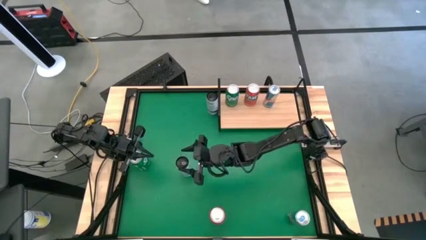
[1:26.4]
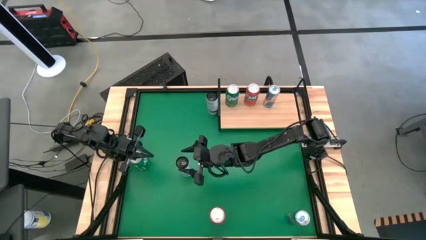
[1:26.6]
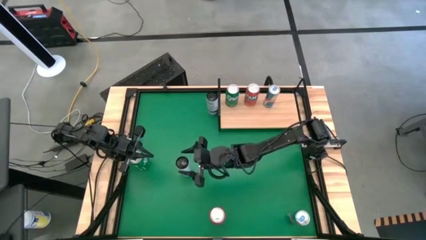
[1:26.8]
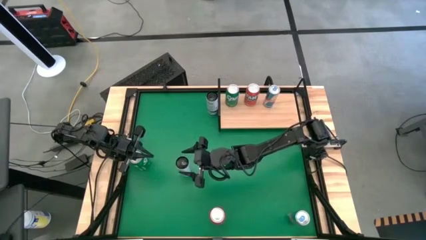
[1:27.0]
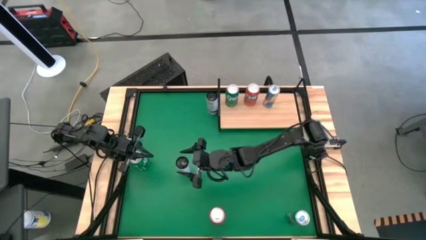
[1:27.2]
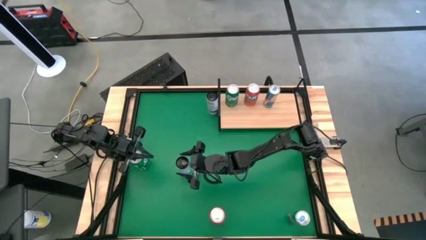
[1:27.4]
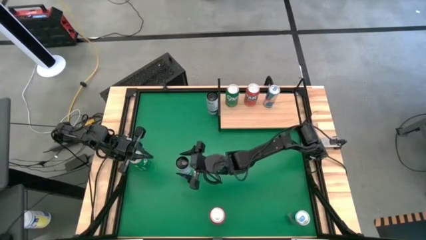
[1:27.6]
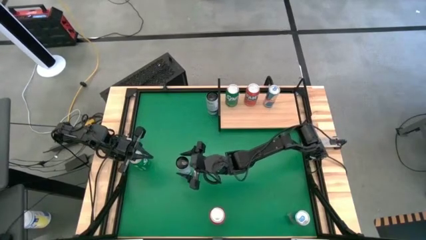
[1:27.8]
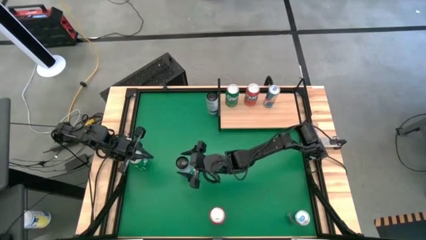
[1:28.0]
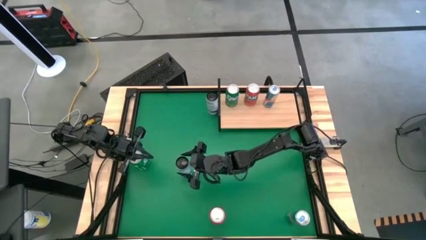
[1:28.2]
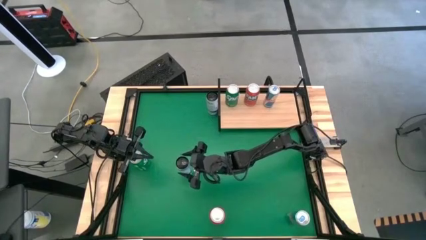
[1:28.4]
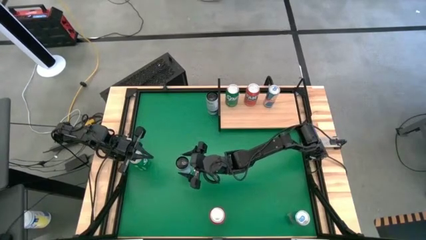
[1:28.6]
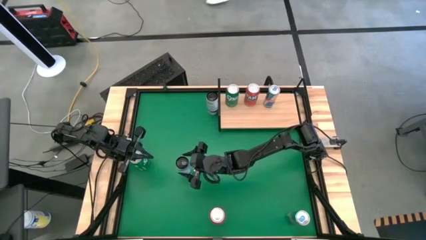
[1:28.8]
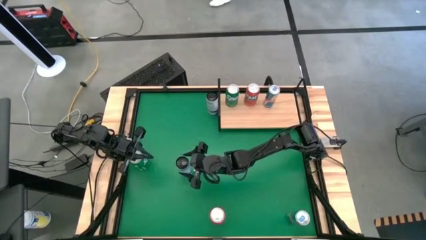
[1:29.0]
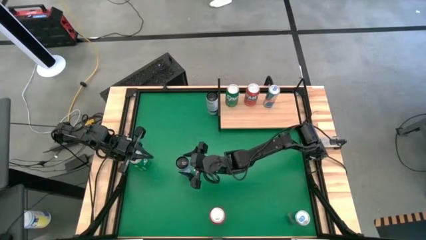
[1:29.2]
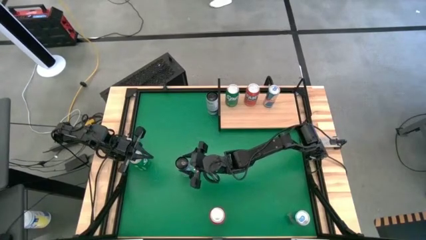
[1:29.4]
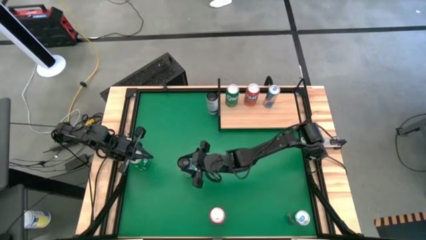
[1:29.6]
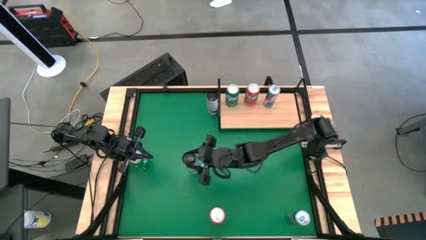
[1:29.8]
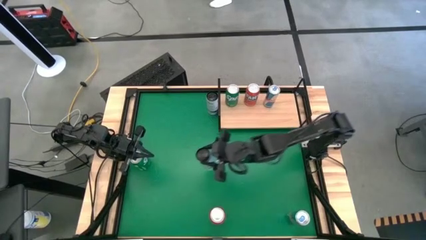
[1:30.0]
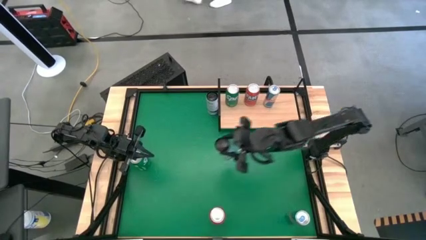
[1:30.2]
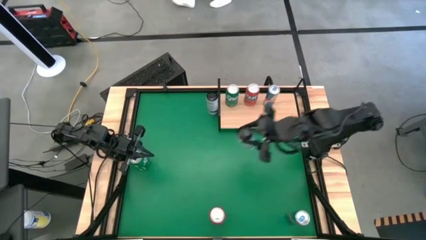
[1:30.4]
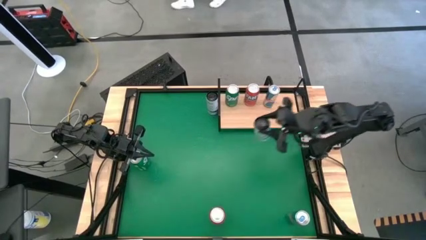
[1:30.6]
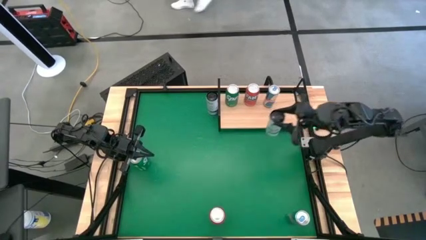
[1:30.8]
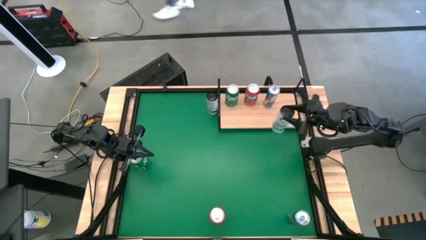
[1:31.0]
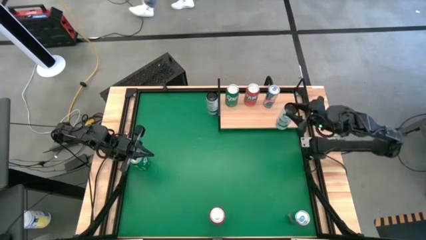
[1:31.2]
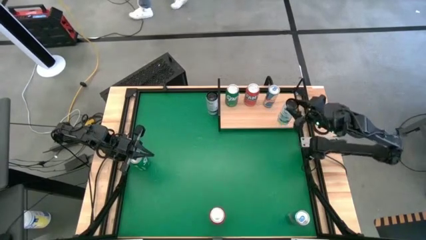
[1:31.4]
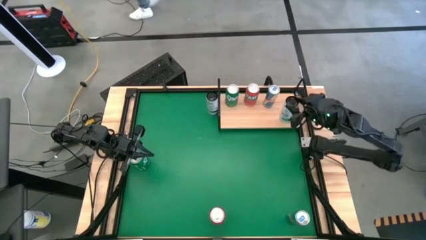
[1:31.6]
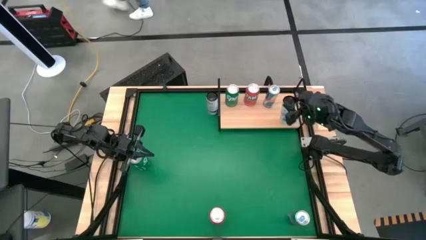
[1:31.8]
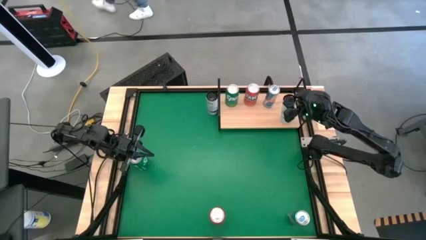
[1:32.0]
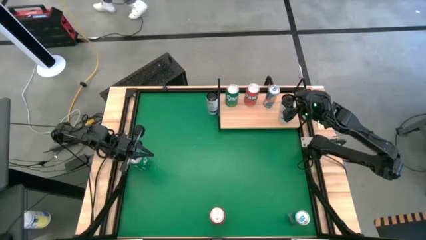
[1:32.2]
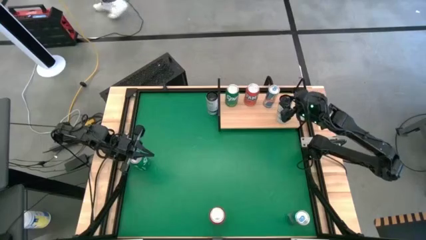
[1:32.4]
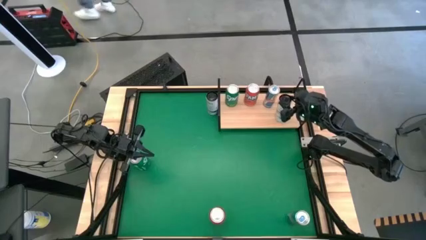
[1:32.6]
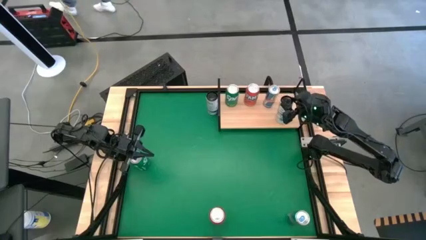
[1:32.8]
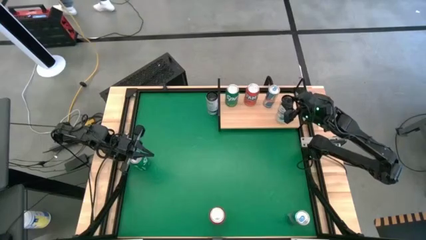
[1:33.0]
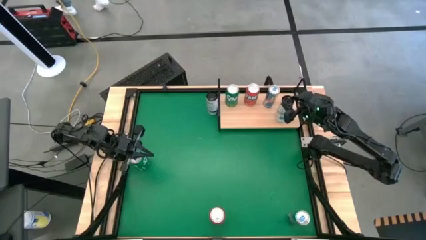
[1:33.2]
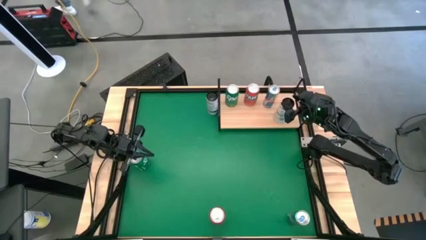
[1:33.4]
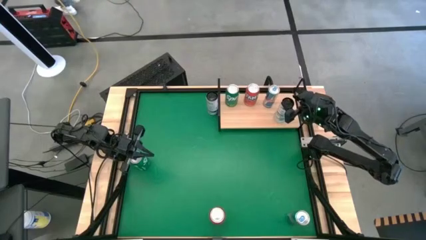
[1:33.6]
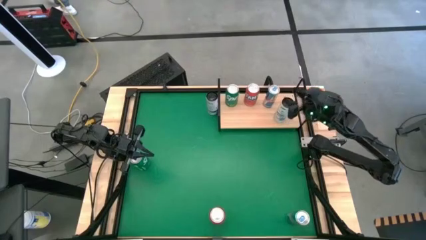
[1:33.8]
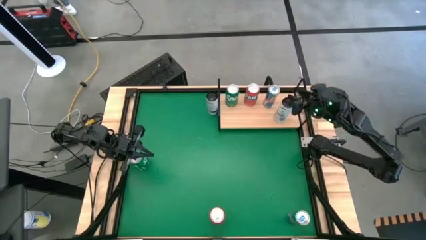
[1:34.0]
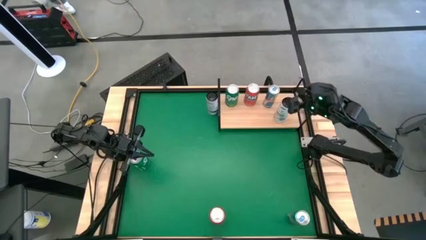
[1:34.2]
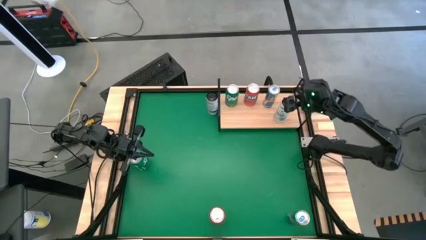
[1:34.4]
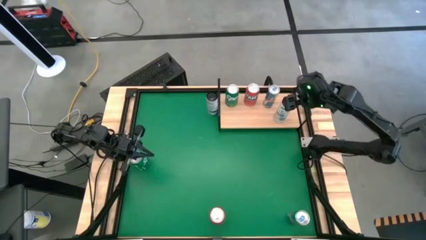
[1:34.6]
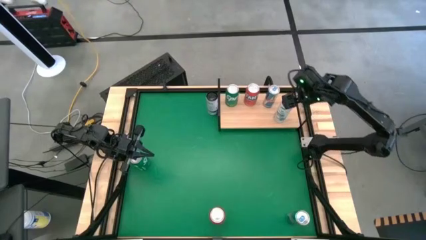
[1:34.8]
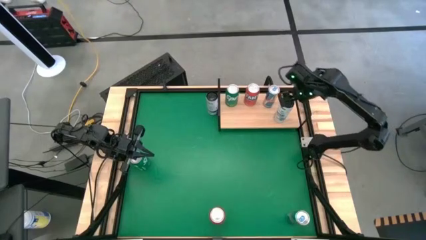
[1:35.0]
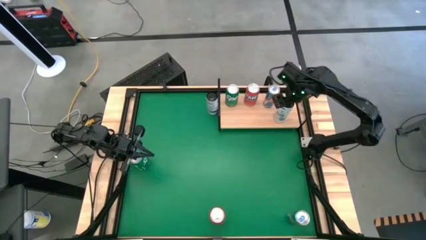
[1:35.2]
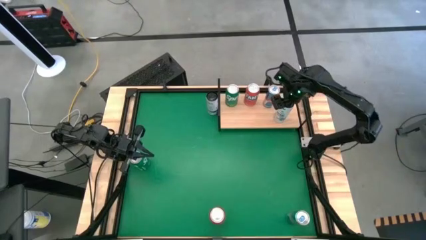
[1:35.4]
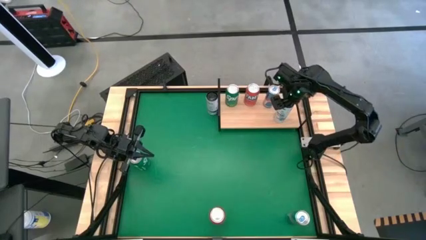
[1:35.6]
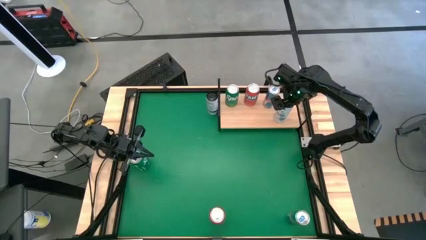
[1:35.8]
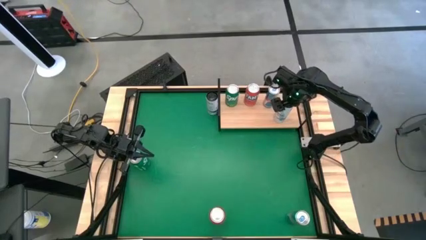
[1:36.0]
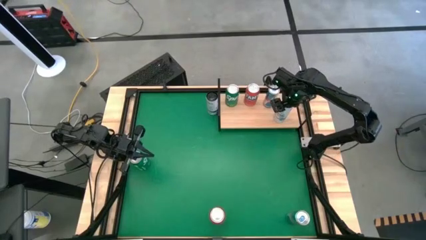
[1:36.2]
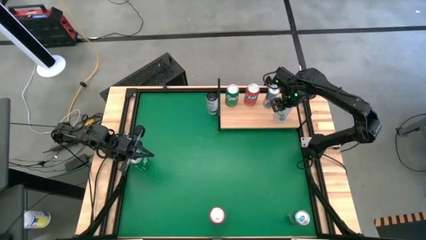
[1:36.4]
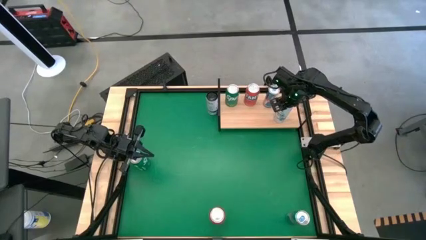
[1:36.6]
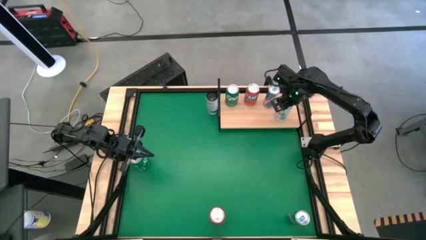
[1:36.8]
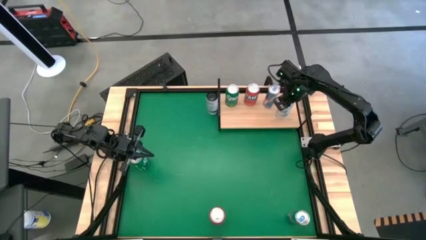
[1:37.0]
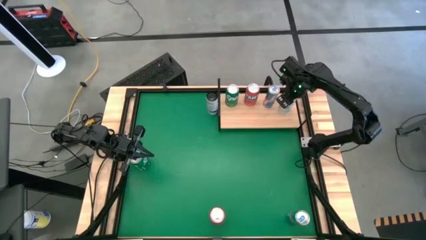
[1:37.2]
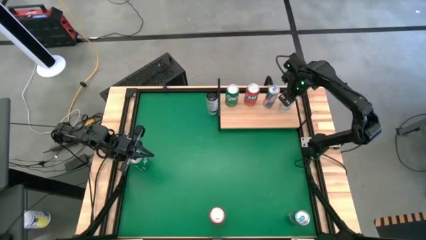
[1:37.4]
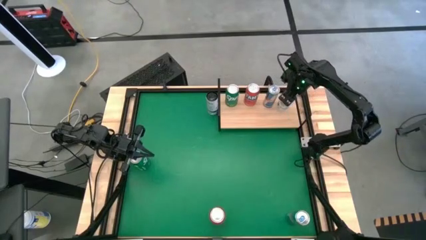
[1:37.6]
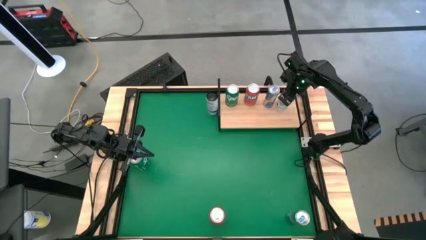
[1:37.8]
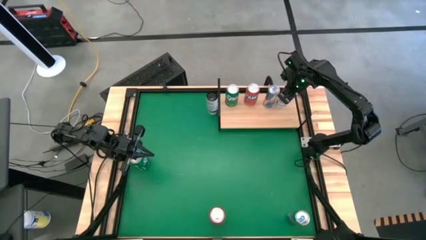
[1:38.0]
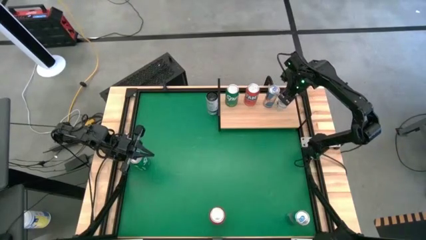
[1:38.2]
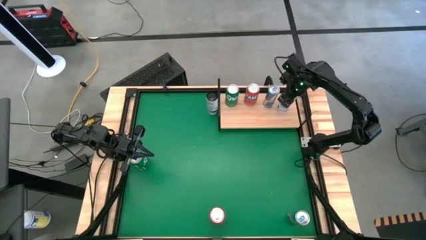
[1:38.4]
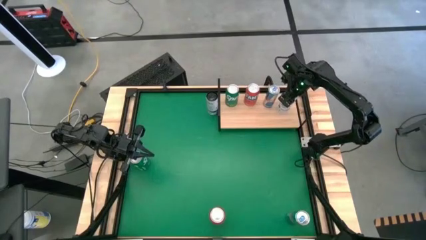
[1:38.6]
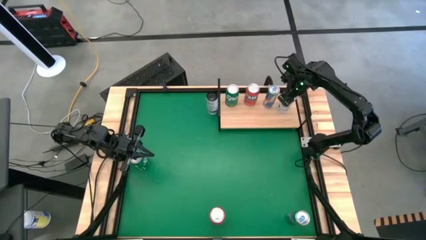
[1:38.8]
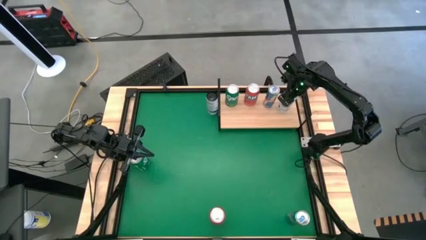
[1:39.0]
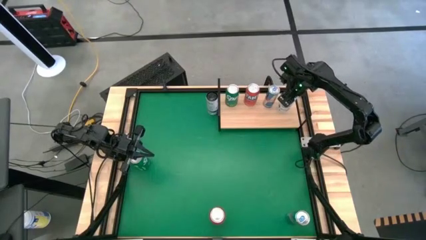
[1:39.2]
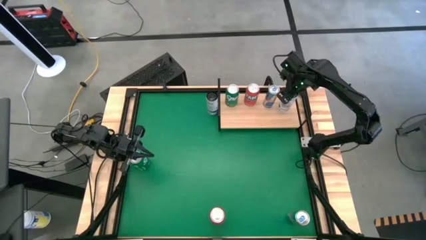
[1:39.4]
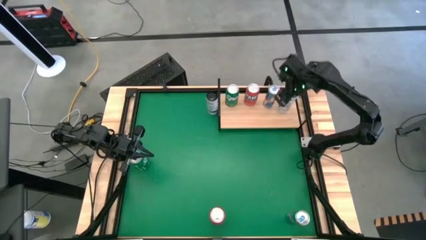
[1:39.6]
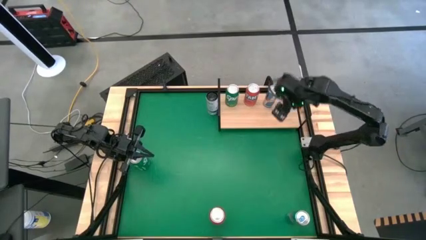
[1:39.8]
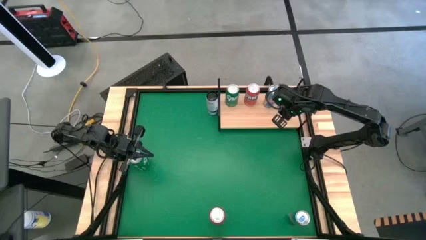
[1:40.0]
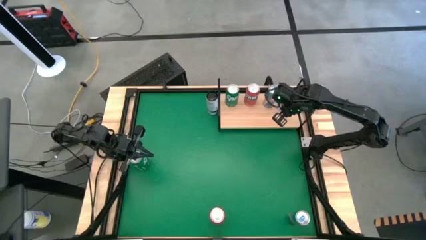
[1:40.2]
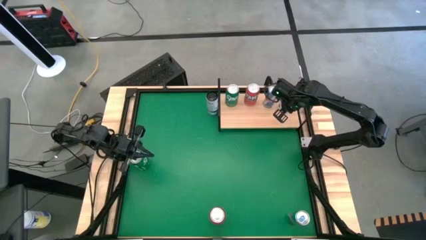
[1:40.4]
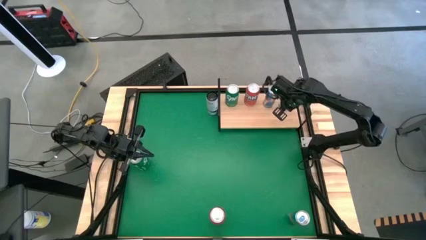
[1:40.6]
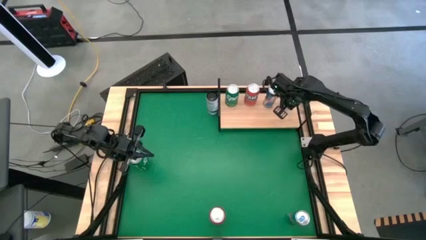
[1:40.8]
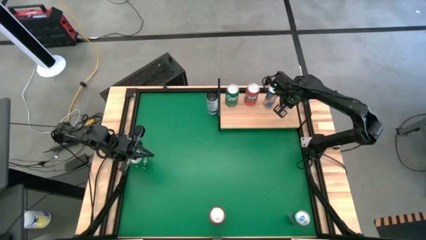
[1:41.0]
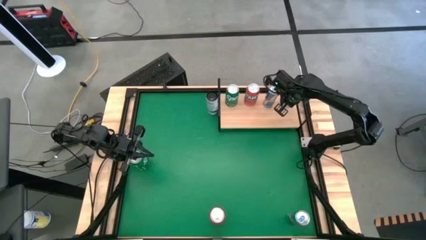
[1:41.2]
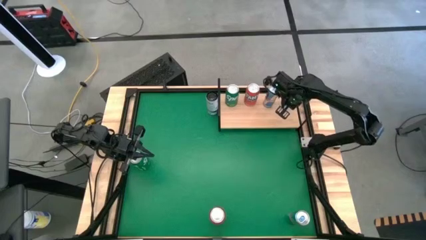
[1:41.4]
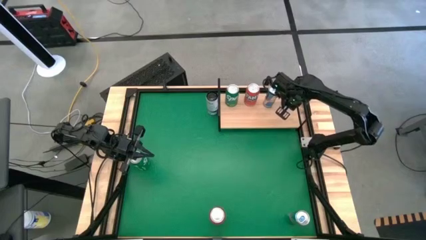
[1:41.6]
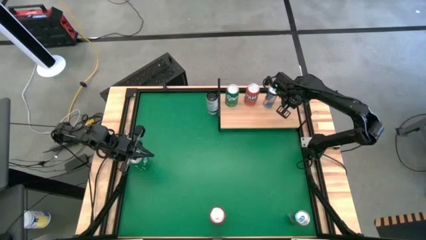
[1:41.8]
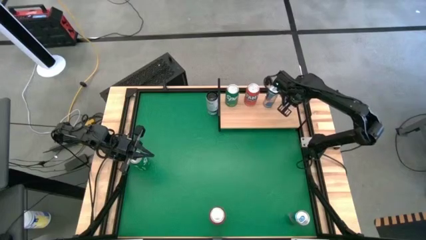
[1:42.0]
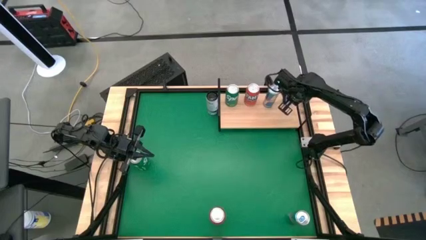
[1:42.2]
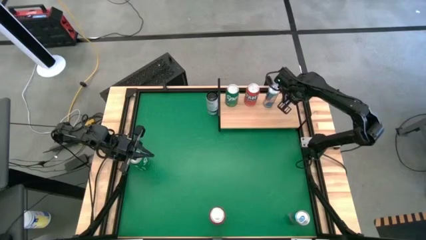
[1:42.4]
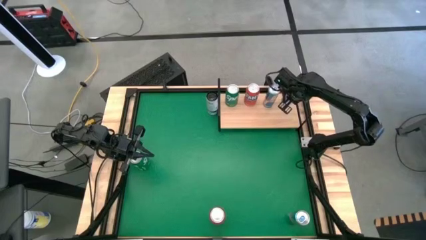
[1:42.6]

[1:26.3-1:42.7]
Task: Place canned beverage on shelf
Put the bottom white and blue soda can on the shelf
